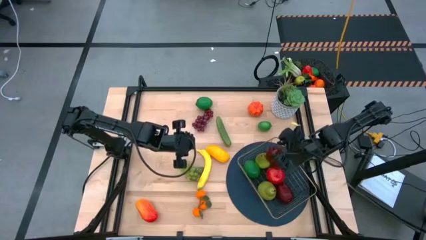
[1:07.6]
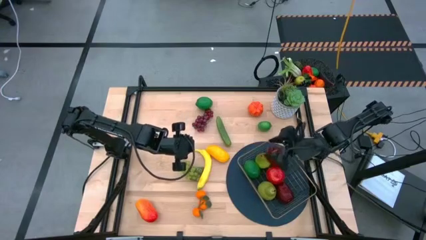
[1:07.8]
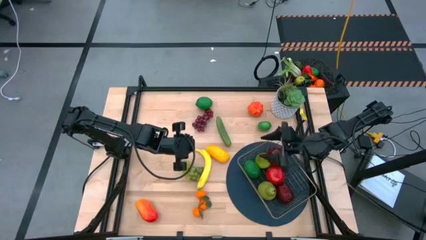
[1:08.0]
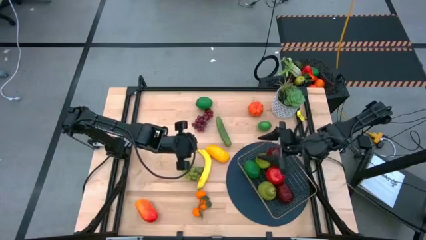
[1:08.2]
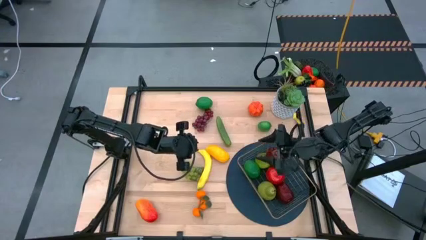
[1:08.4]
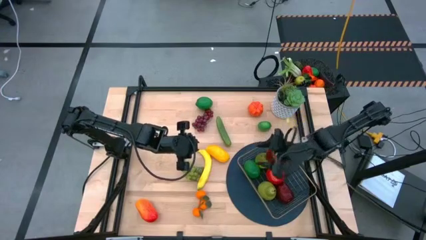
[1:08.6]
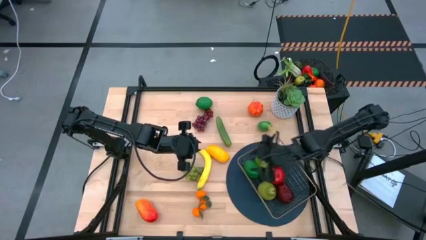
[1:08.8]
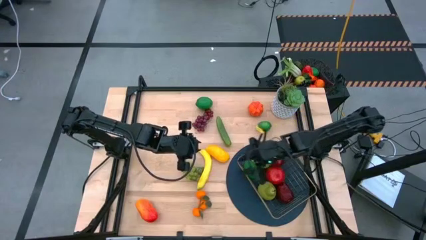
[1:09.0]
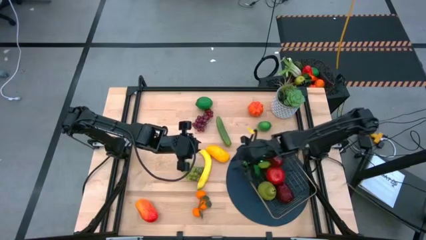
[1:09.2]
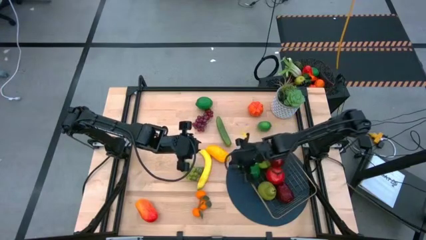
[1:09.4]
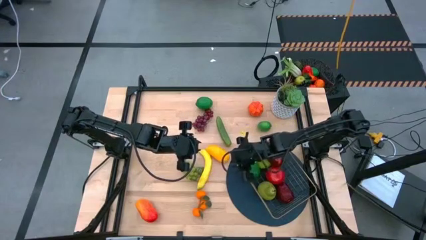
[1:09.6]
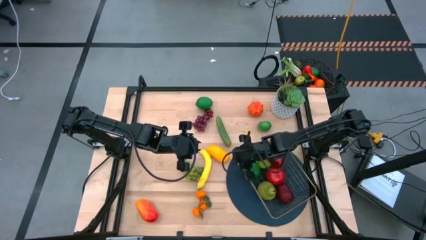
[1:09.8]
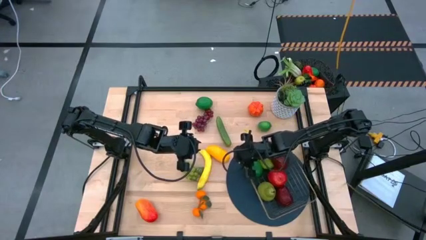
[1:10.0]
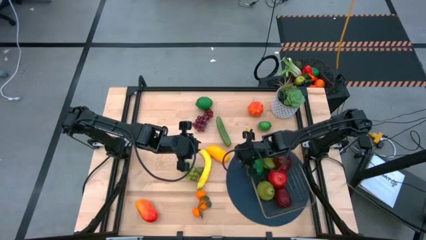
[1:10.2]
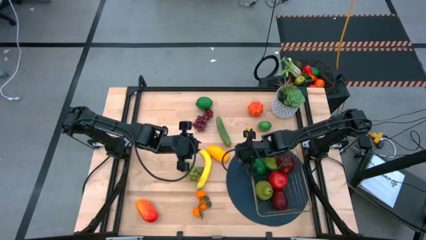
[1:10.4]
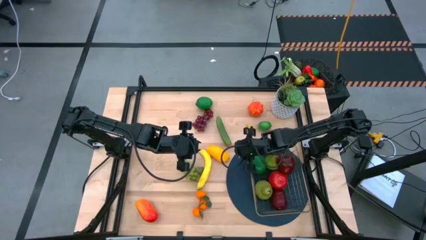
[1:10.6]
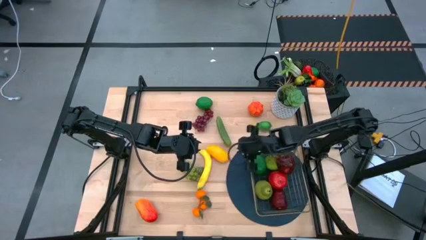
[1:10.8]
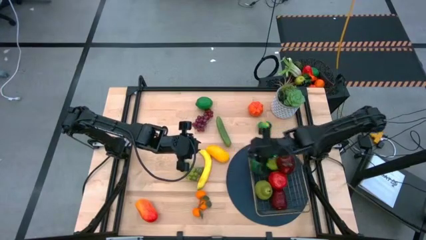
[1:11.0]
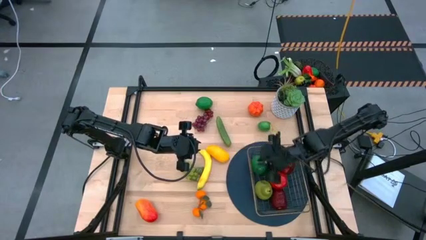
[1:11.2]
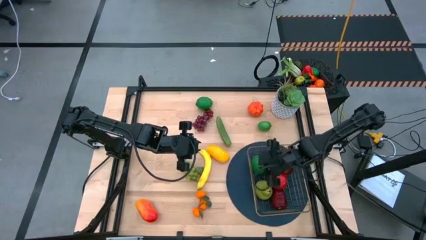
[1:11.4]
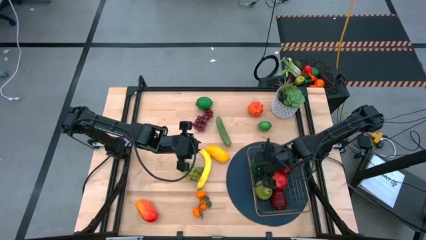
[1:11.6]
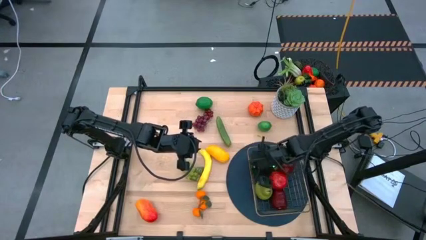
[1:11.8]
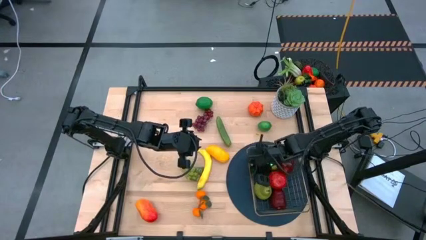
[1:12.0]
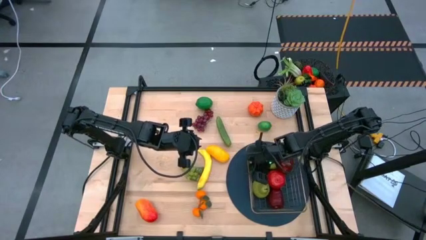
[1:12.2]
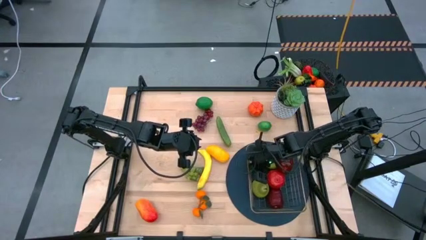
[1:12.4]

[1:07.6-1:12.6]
Task: Build produce basket
Adjust the wire basket

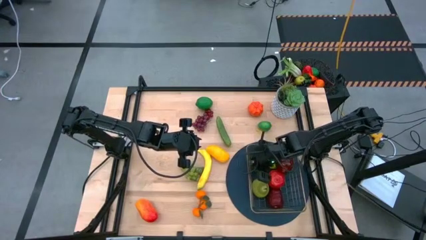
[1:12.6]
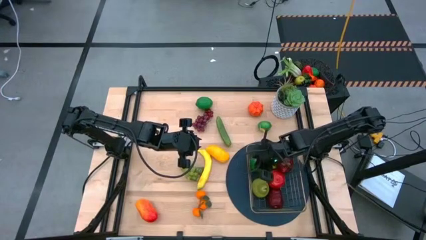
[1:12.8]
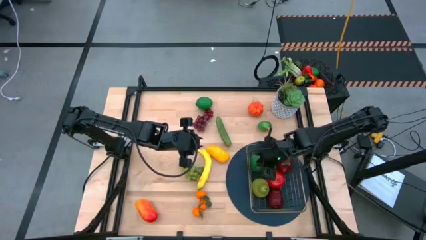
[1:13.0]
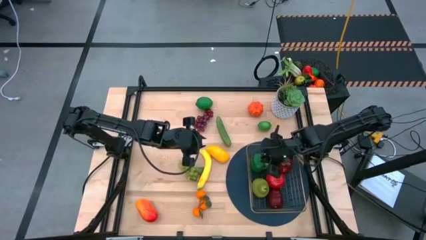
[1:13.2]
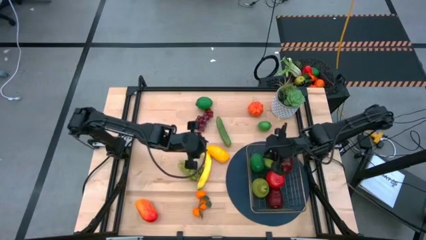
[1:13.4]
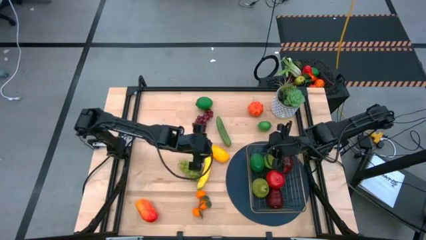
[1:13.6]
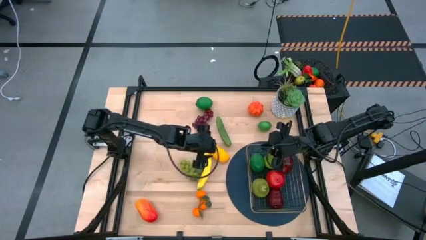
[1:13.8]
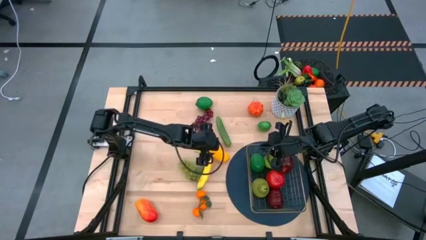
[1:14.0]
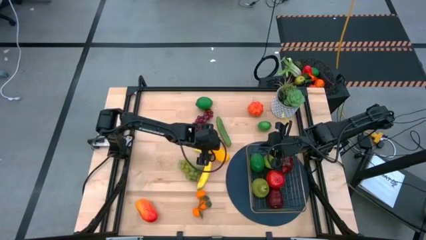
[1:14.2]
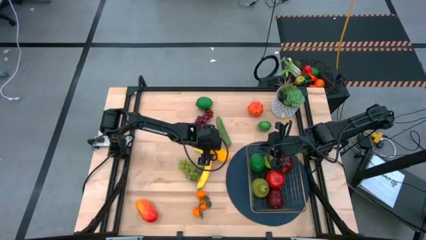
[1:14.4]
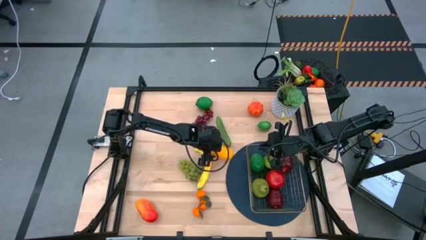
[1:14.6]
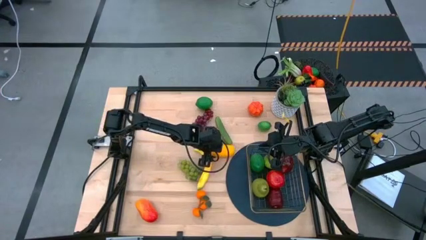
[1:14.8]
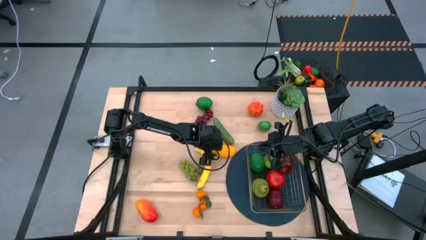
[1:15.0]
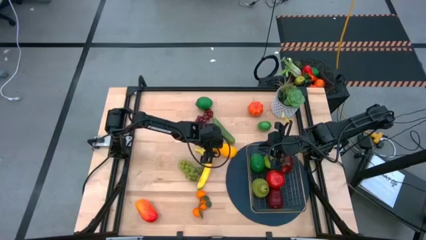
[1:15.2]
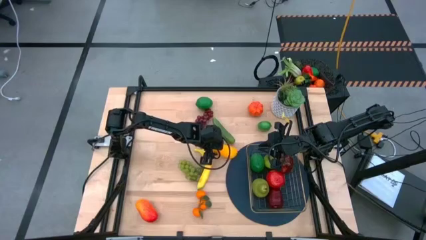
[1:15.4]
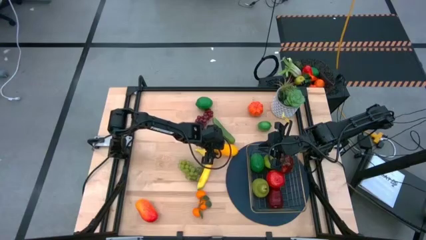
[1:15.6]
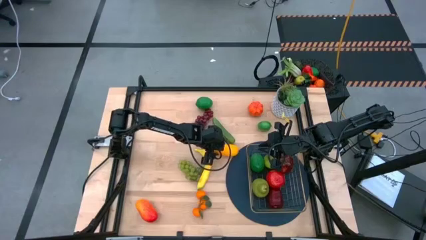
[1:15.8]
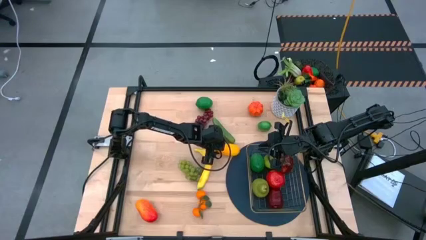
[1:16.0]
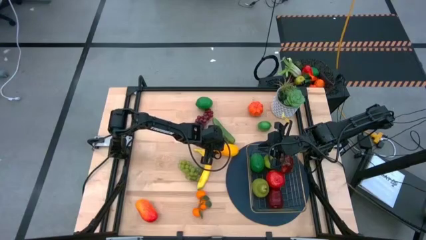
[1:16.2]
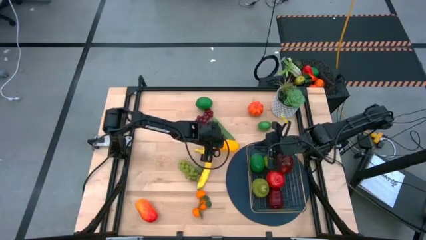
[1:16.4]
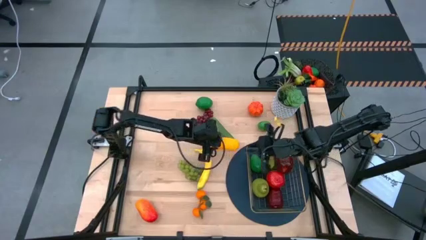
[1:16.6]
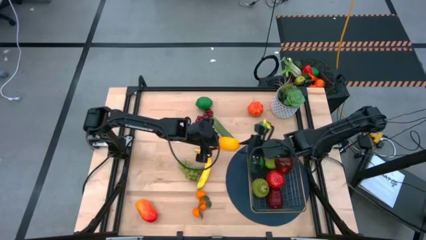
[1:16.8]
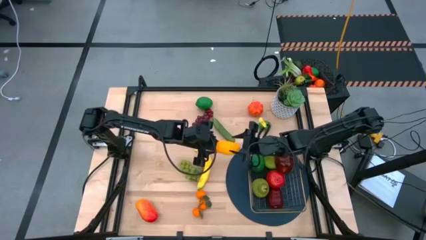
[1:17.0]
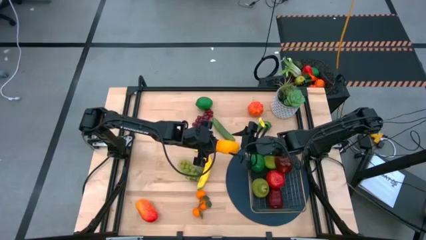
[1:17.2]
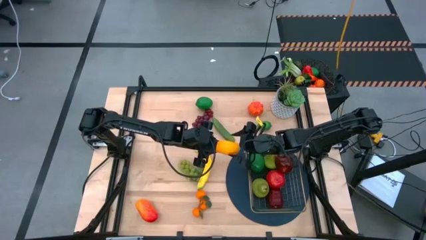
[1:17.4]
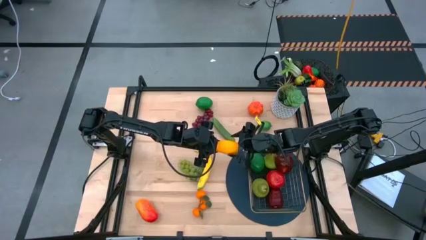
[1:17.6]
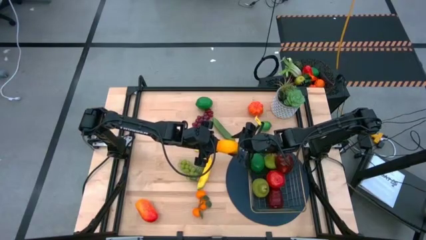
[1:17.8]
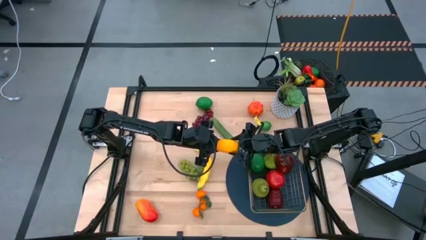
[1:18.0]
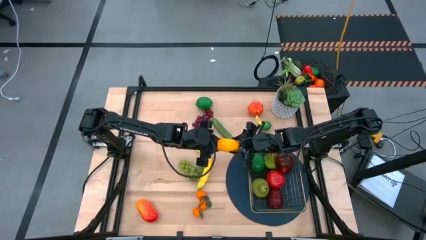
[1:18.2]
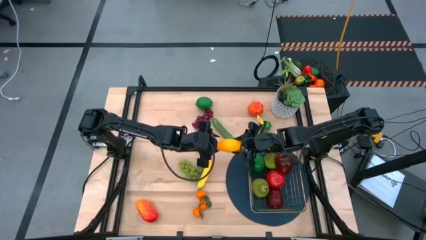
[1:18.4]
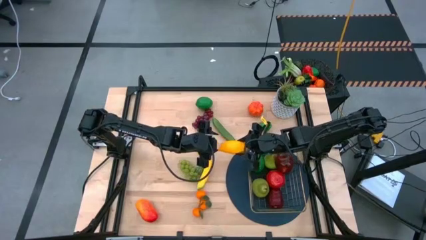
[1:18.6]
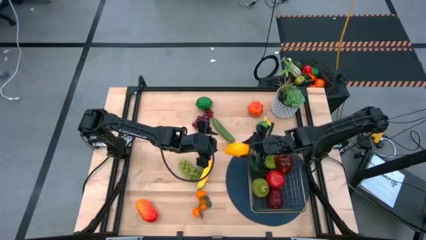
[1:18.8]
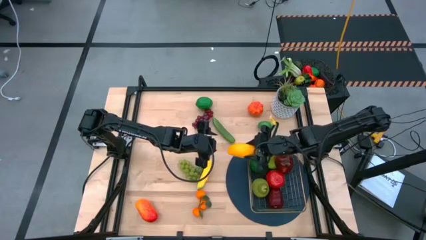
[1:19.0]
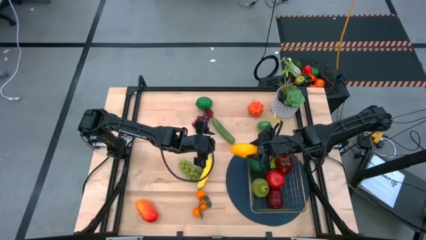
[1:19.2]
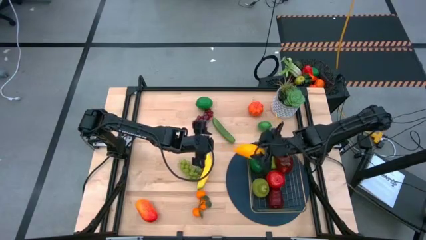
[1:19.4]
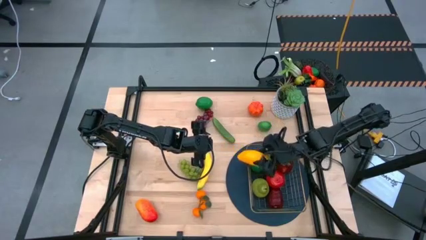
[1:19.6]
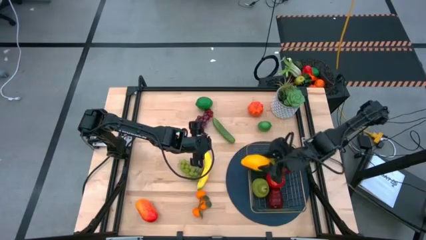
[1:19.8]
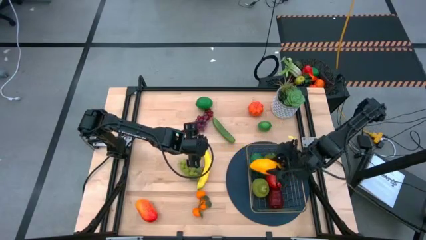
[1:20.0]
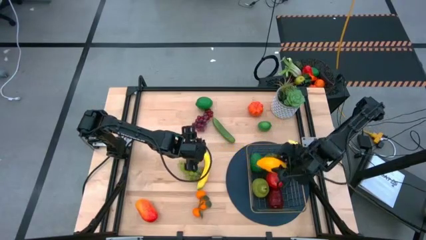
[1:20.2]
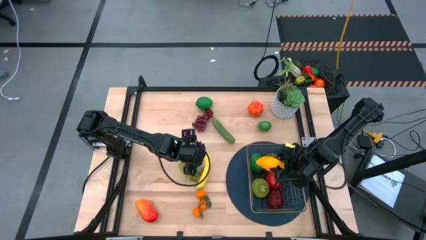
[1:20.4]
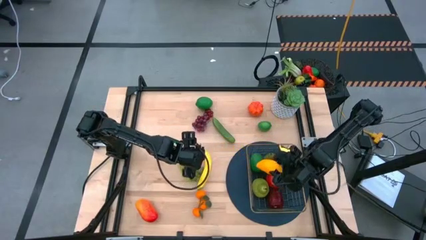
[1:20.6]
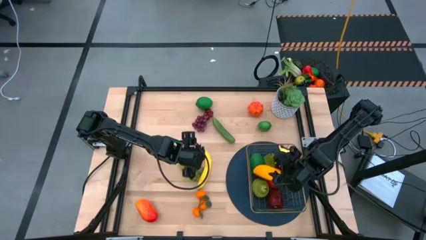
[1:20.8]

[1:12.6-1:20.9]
Put the yellow mango into the wire basket

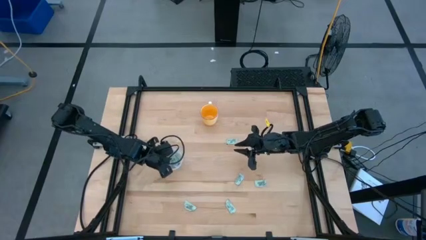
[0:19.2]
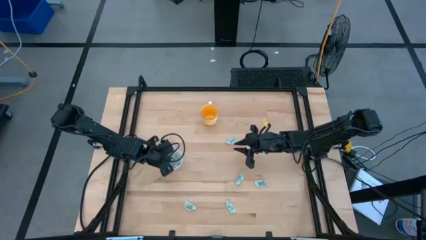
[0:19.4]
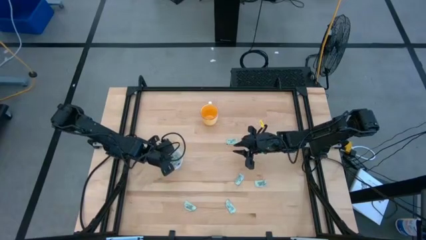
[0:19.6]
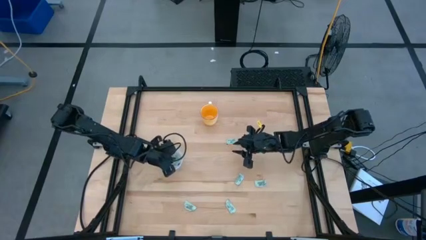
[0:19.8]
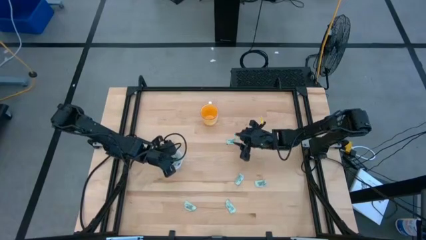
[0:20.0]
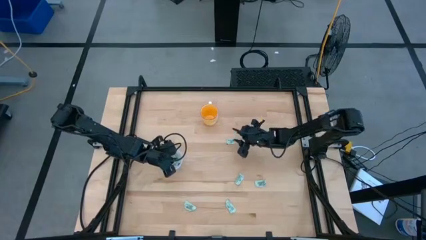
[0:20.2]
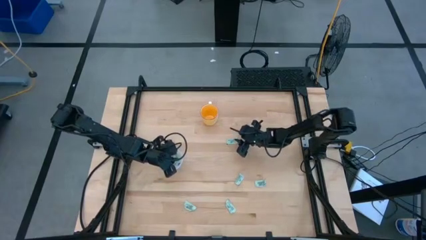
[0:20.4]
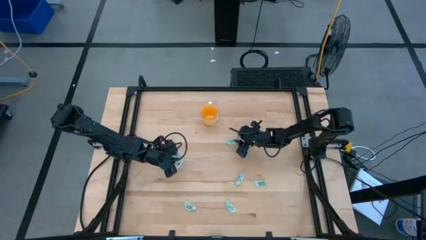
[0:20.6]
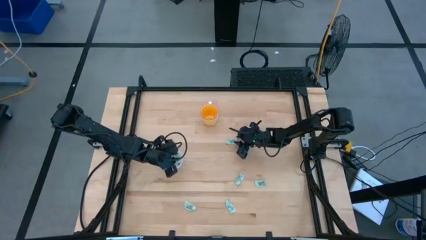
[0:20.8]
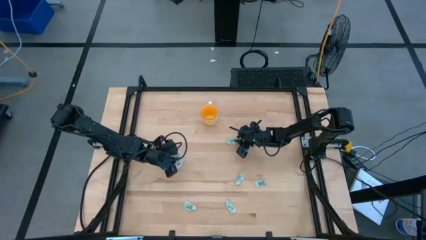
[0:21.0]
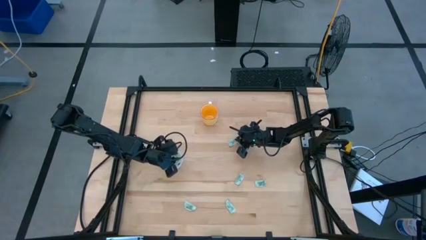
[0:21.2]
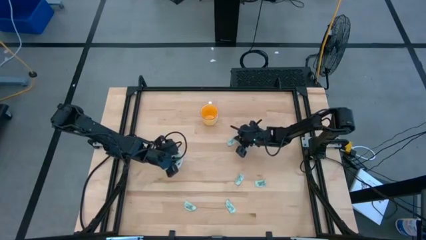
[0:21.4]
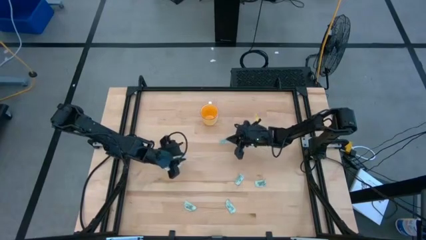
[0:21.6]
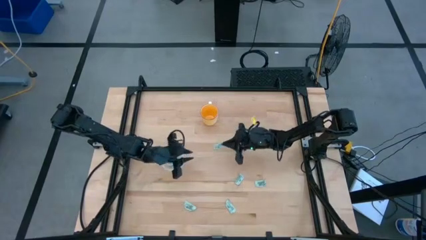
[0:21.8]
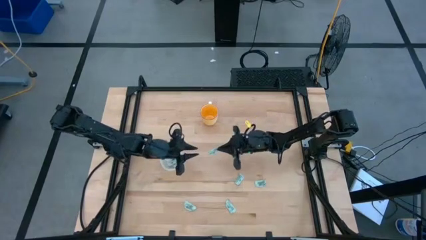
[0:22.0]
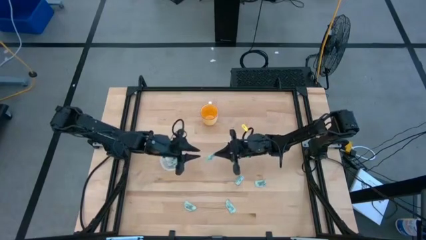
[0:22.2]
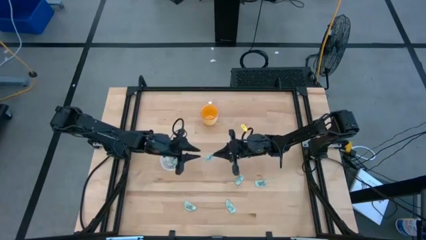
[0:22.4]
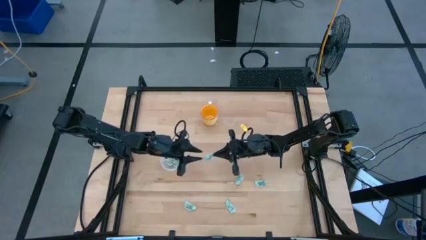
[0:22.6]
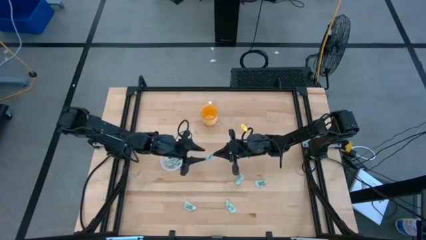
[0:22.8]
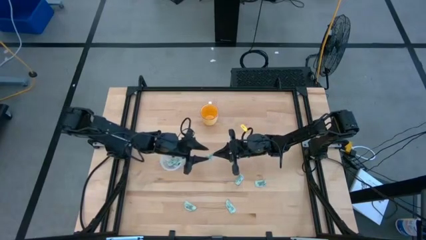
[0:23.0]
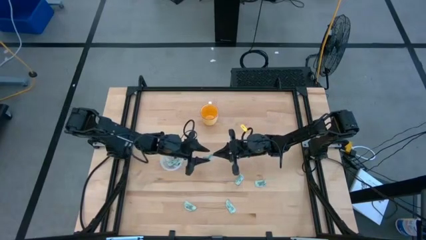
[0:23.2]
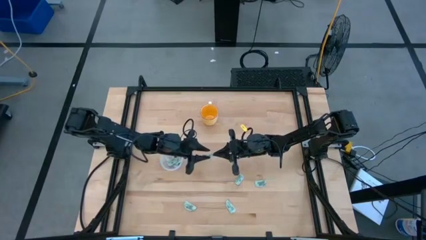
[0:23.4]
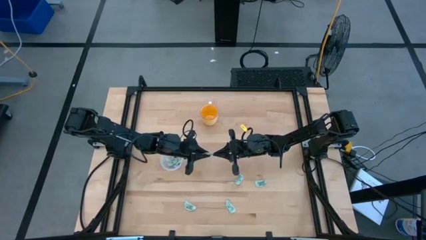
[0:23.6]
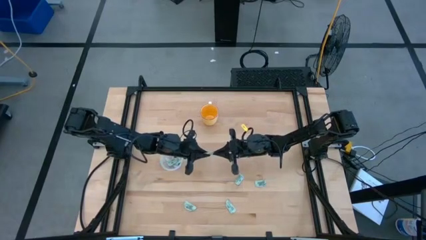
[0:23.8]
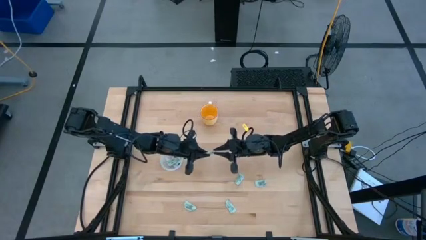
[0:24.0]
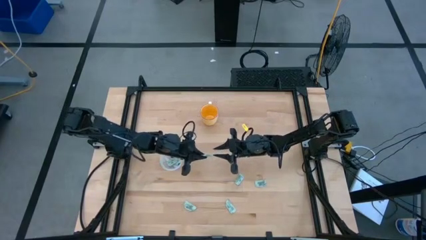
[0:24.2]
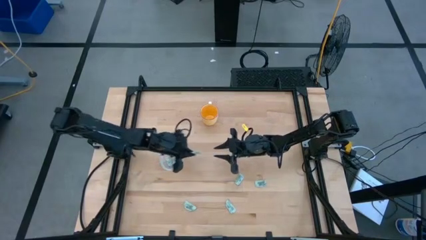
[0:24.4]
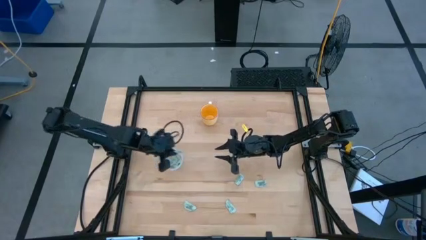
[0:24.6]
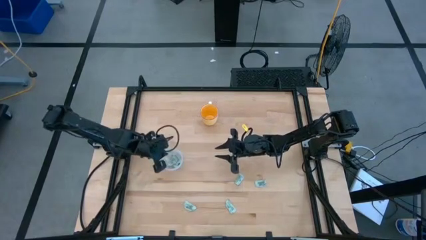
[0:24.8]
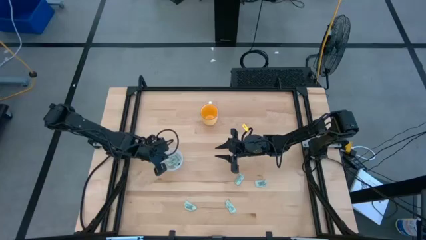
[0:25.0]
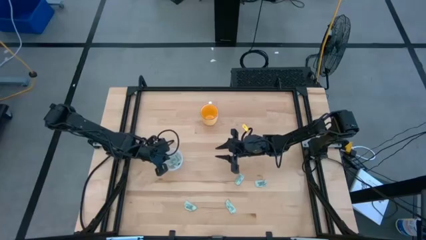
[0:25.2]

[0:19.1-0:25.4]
Task: Pick and place Stevia / Truvia into bins
Put the stevia packet into the container
